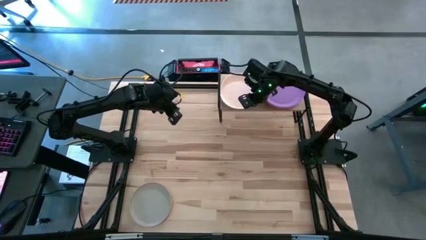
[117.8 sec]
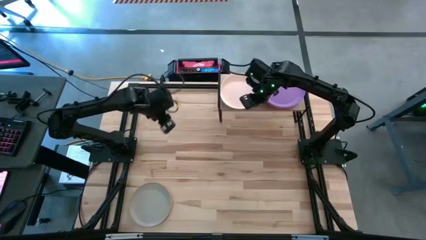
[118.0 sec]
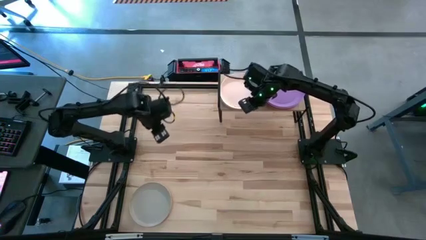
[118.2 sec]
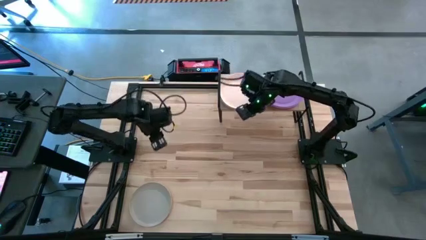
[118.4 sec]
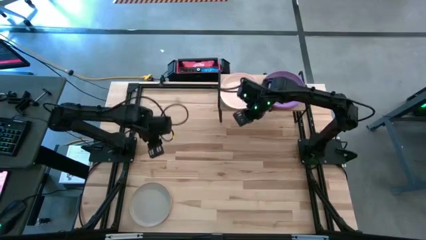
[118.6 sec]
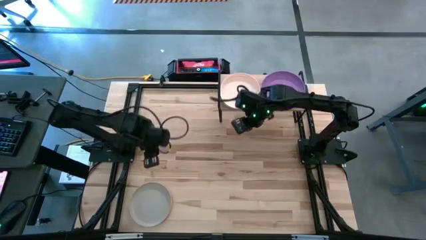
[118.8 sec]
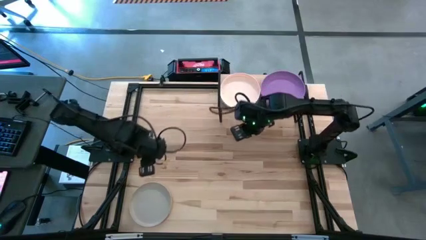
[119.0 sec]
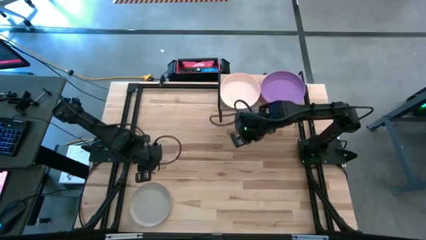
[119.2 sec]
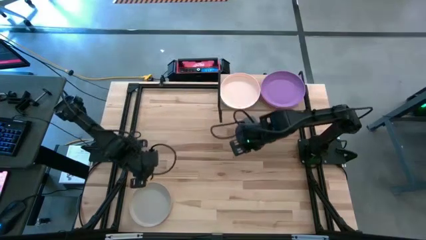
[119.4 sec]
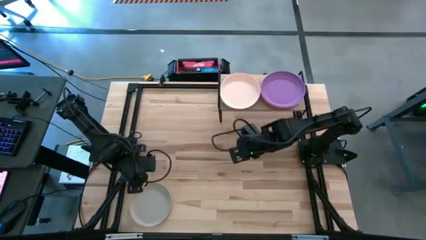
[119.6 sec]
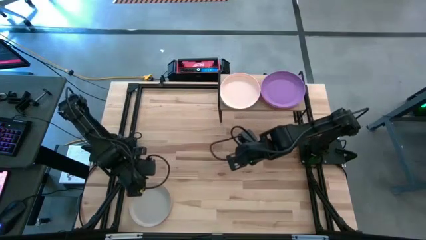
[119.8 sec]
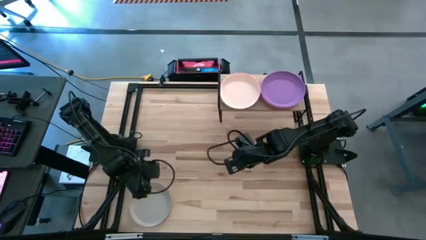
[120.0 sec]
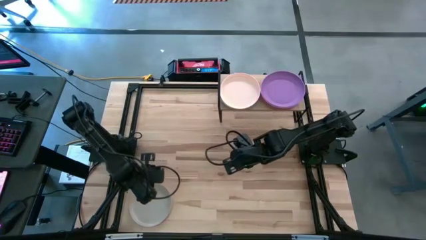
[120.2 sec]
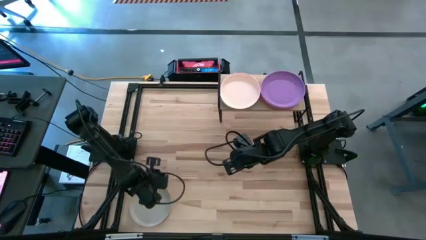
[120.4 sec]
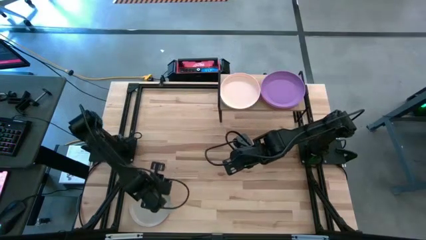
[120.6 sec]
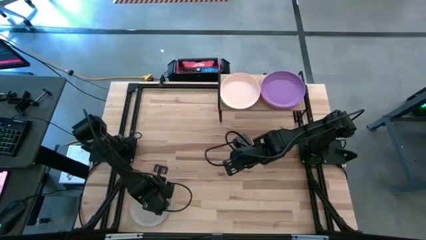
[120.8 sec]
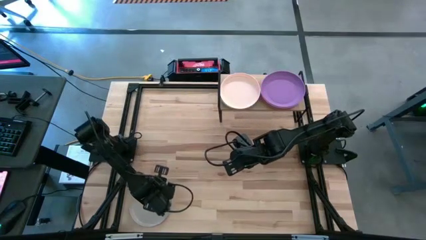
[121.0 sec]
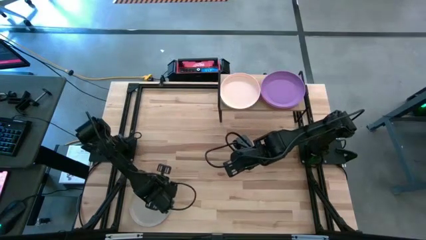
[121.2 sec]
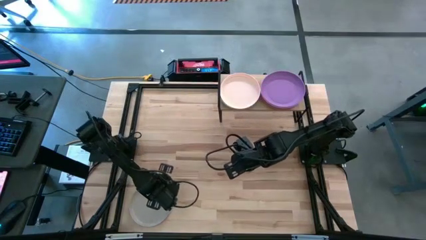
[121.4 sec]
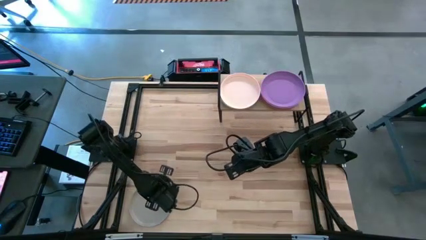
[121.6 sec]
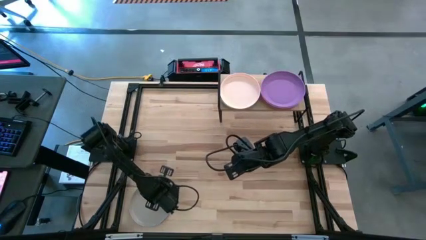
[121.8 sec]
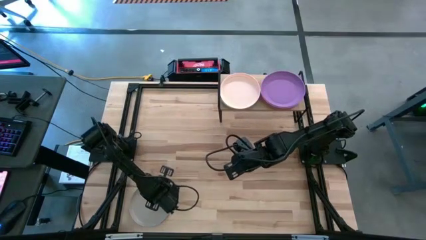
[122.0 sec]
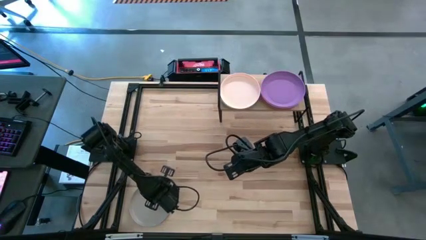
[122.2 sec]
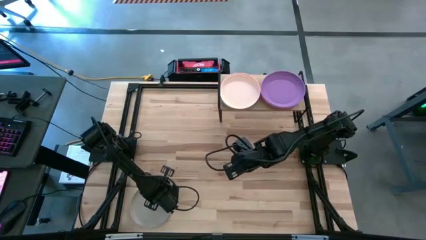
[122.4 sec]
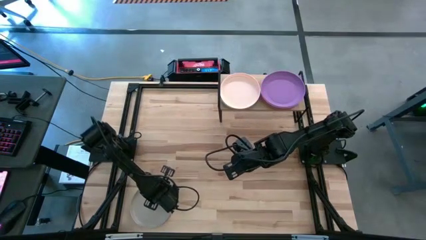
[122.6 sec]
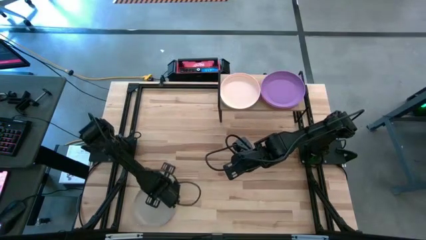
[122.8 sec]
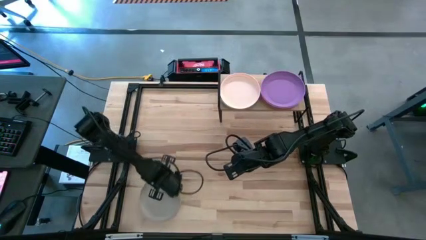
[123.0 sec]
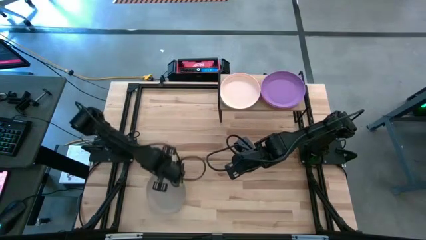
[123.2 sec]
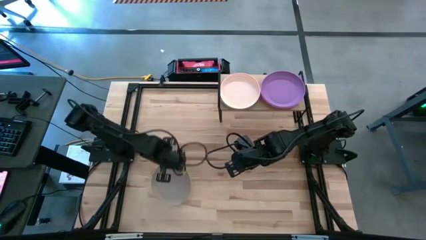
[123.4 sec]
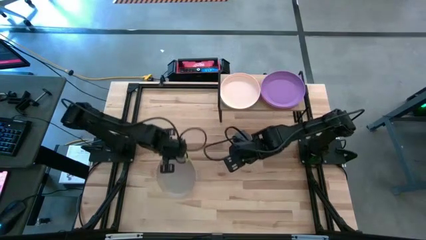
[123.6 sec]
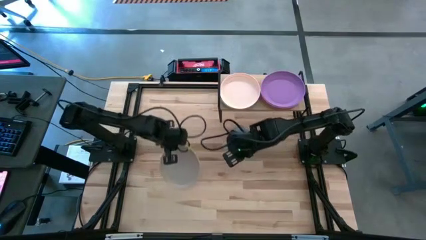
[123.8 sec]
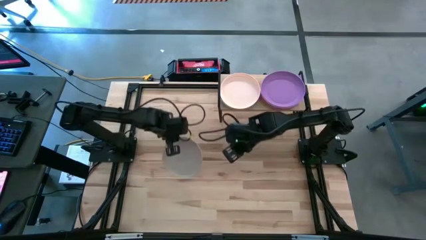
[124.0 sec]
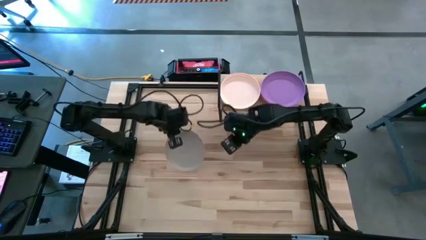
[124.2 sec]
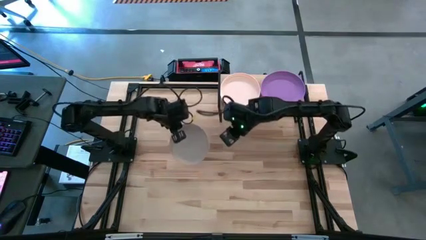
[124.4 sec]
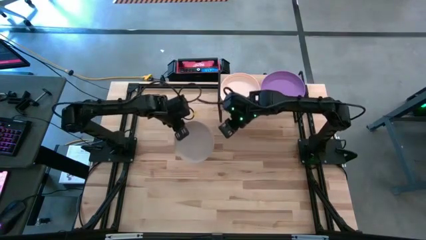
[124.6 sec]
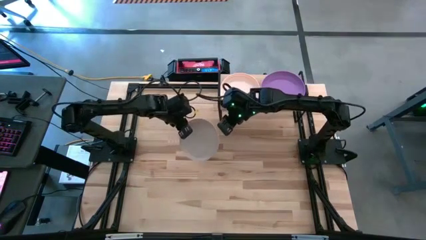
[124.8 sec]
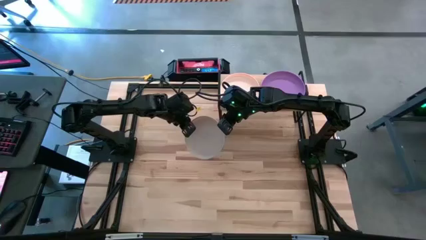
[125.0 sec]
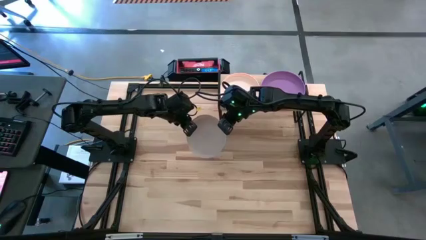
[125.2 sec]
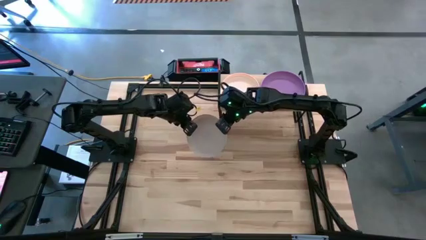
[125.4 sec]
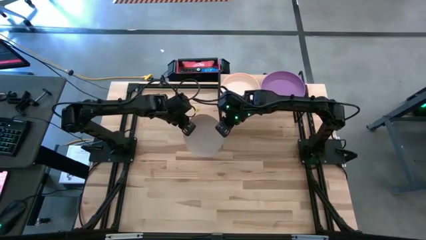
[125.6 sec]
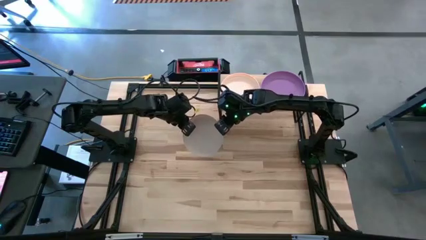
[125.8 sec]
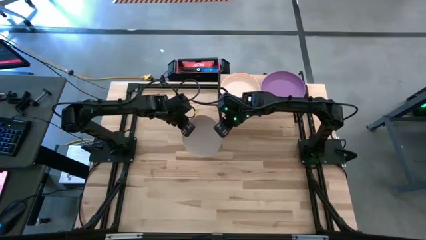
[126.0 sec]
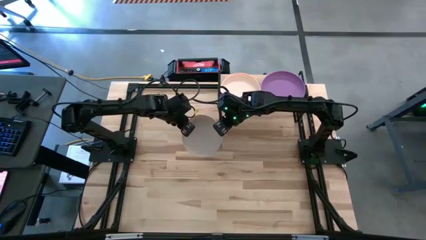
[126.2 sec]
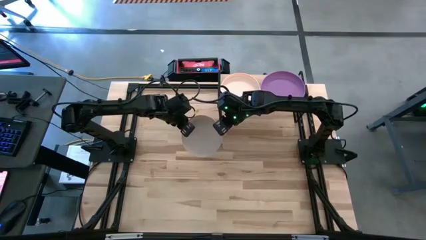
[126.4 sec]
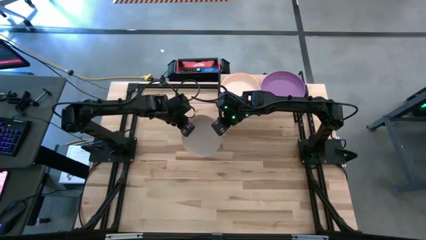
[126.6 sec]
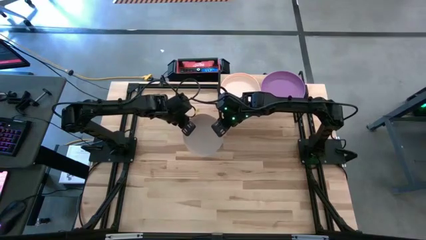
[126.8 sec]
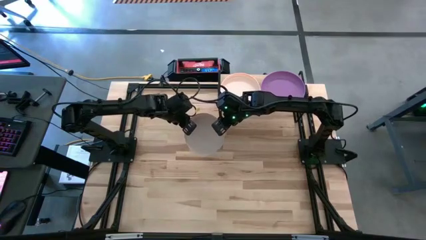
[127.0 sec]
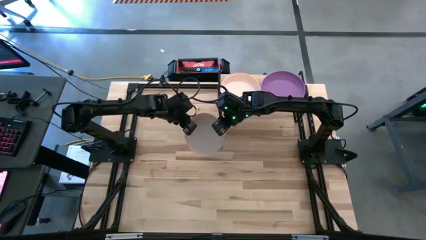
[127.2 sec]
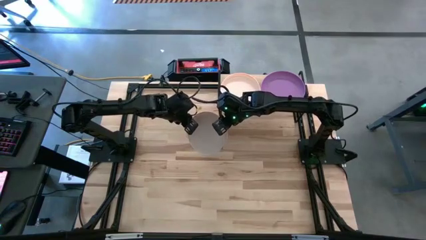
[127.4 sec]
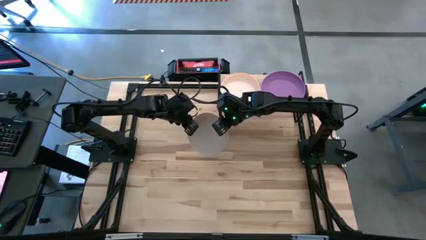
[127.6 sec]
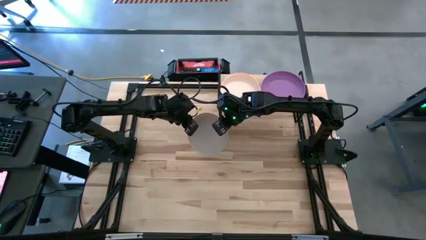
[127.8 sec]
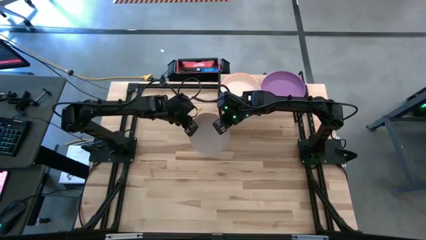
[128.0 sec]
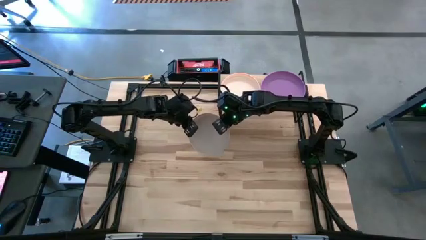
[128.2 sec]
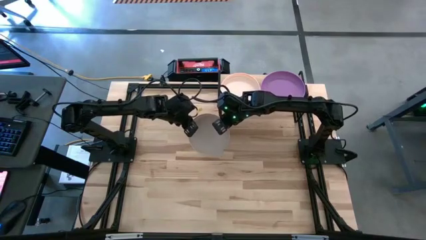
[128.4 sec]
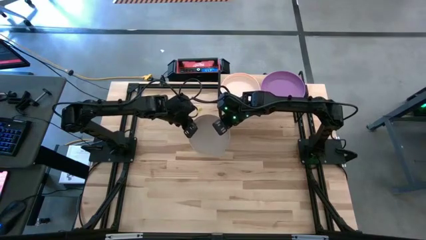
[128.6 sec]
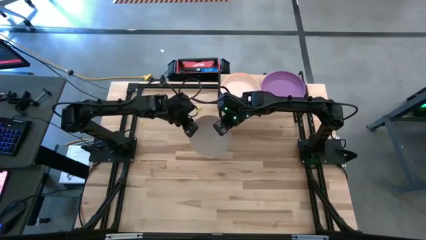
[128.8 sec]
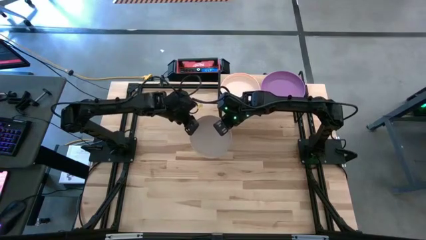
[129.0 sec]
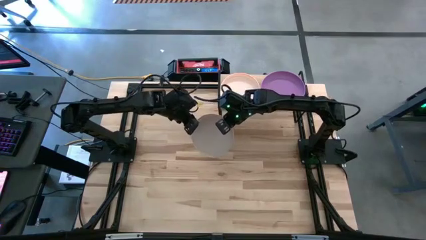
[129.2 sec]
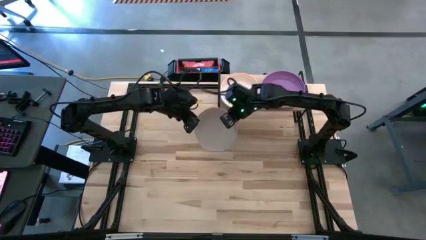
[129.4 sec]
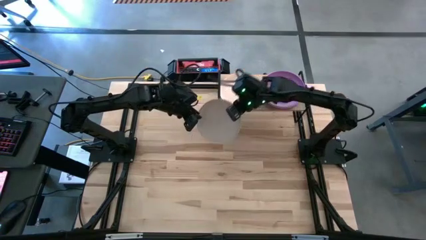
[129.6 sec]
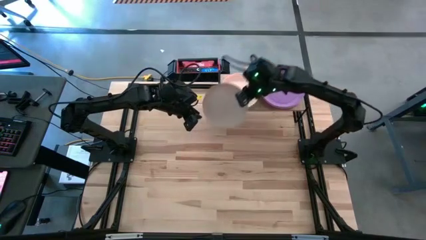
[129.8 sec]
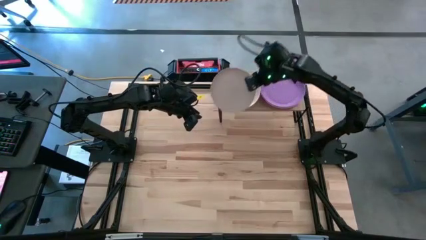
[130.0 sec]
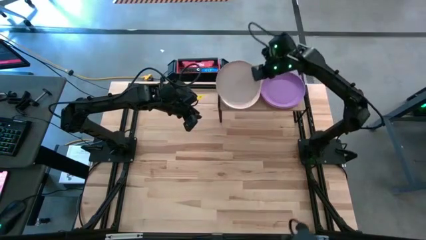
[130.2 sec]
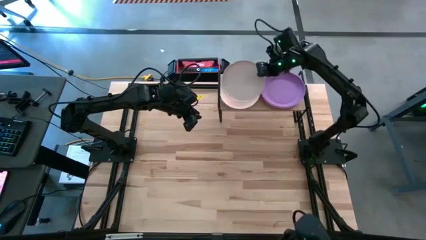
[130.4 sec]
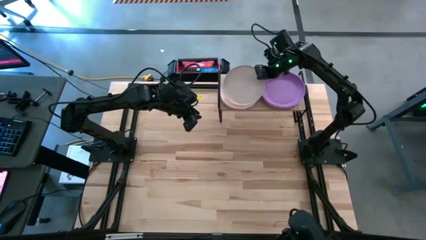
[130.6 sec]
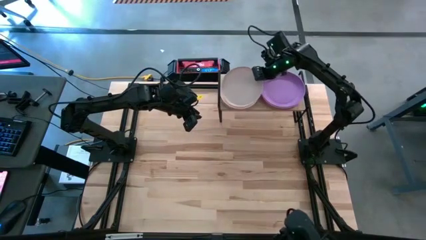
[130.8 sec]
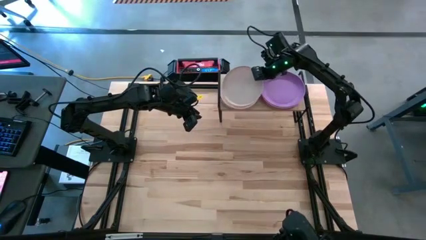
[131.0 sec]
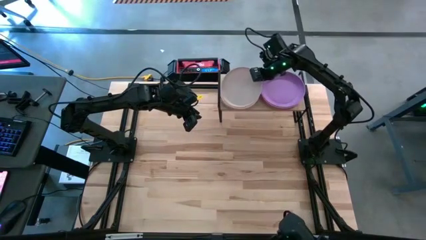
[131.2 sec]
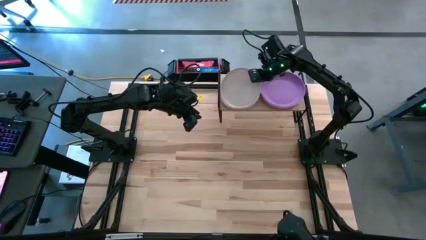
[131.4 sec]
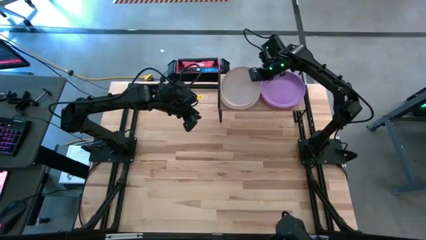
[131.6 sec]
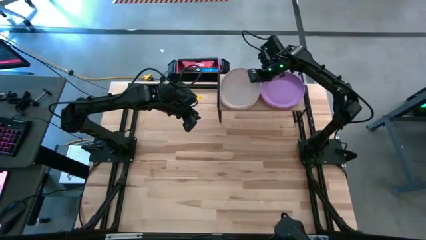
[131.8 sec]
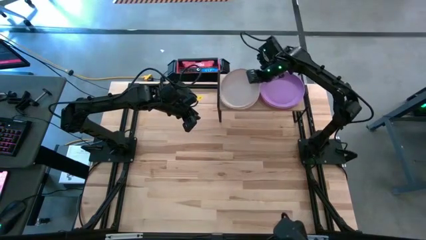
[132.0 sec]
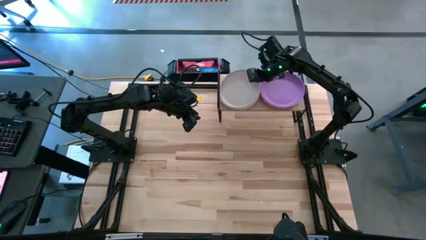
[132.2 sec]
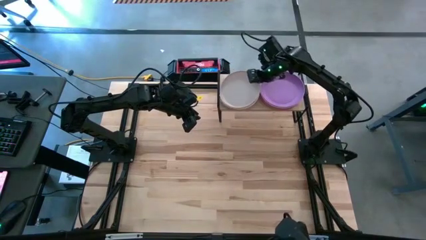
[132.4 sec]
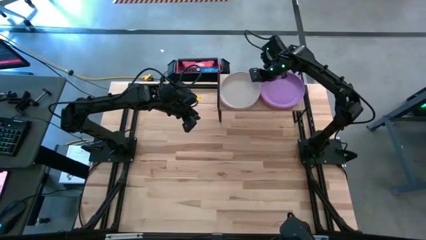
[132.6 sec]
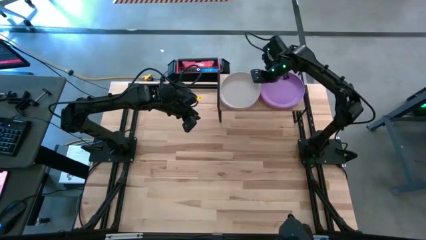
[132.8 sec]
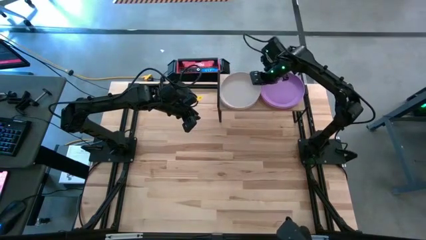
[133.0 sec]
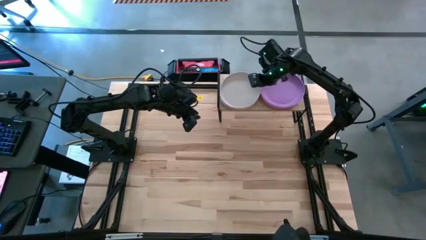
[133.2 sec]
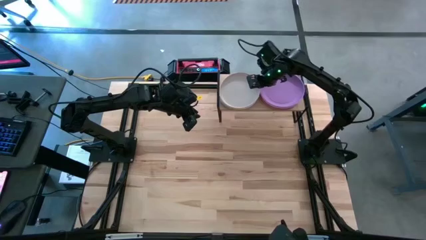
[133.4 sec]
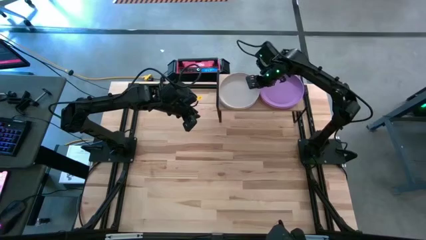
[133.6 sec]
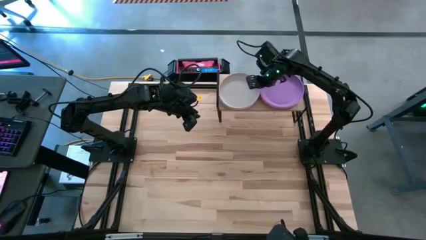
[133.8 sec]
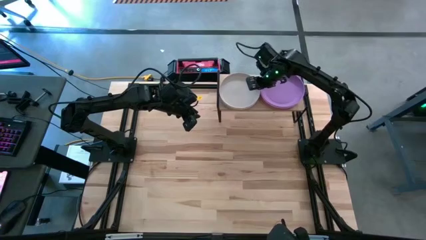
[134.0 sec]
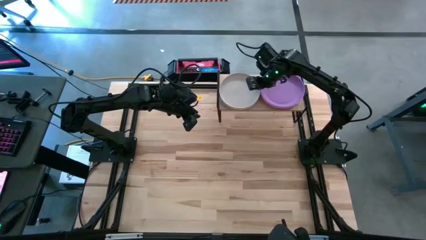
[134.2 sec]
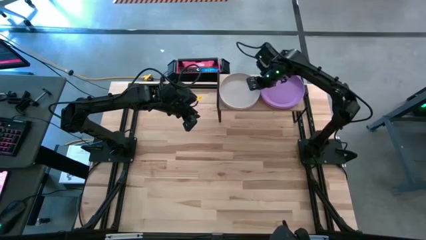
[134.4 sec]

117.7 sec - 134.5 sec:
Task: Place and stack plates onto a shelf
Stack the gray plate on top of the white plate on the shelf
